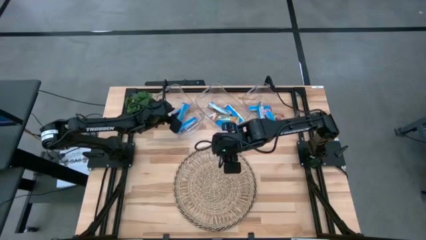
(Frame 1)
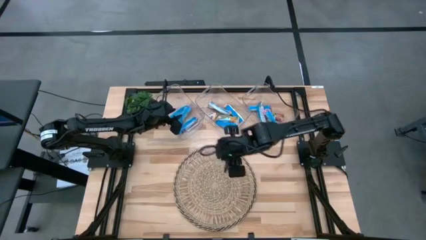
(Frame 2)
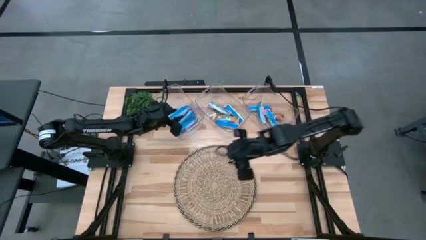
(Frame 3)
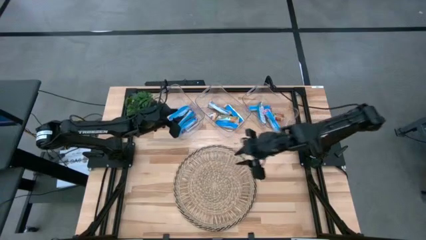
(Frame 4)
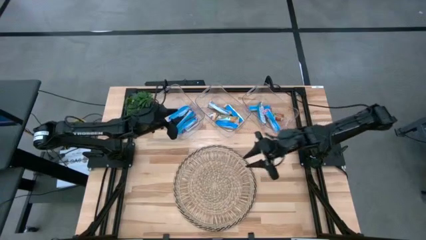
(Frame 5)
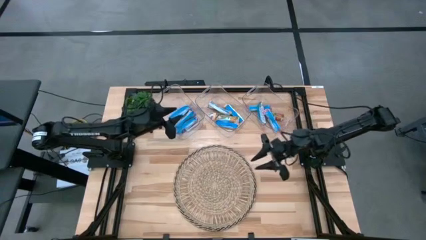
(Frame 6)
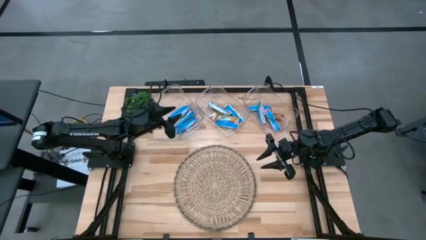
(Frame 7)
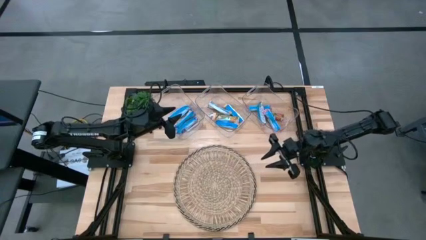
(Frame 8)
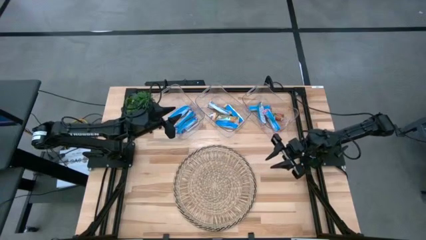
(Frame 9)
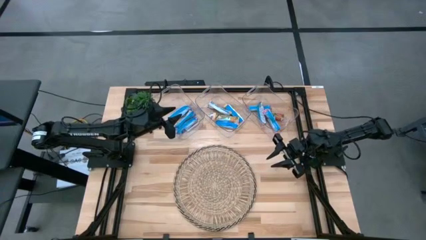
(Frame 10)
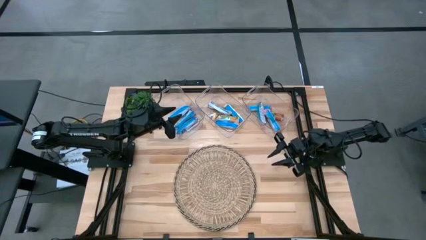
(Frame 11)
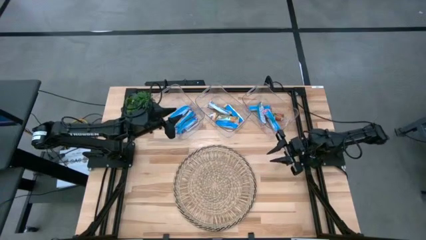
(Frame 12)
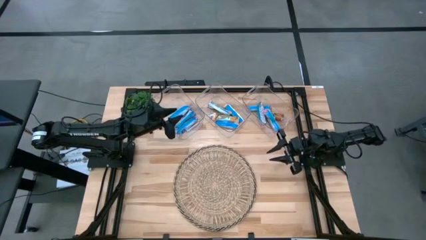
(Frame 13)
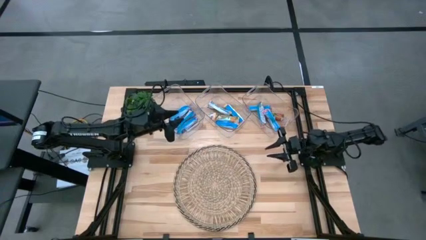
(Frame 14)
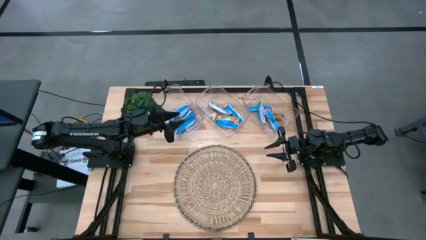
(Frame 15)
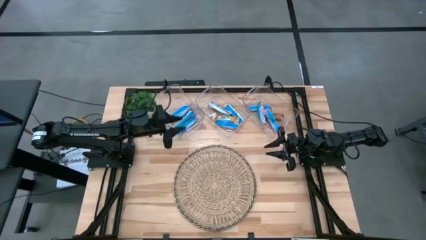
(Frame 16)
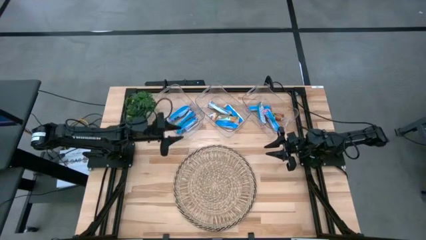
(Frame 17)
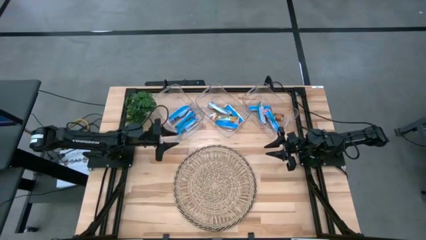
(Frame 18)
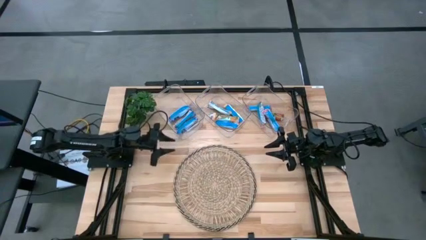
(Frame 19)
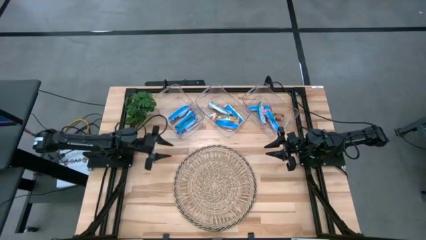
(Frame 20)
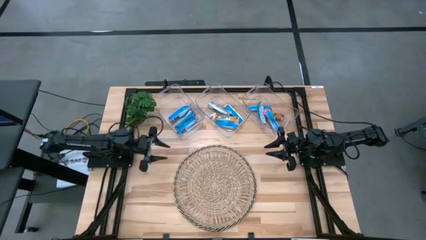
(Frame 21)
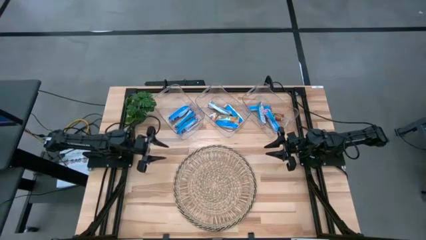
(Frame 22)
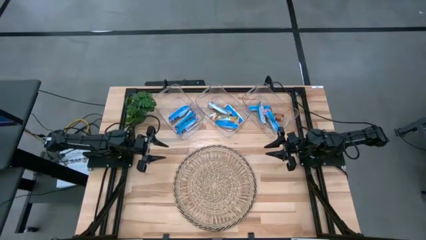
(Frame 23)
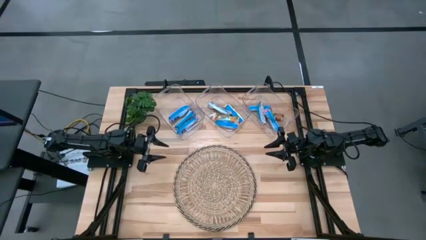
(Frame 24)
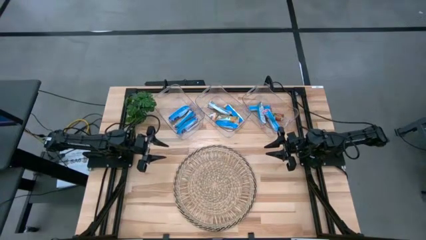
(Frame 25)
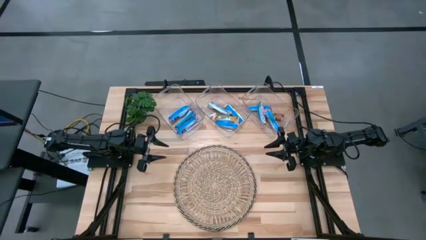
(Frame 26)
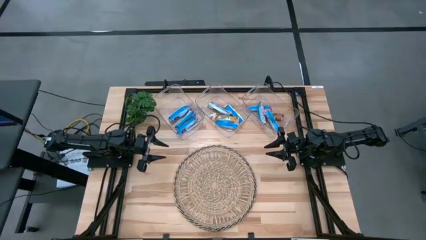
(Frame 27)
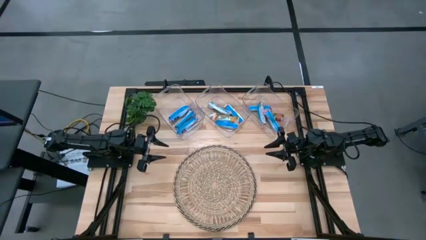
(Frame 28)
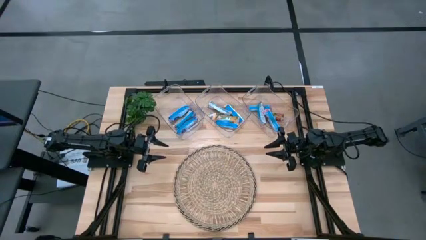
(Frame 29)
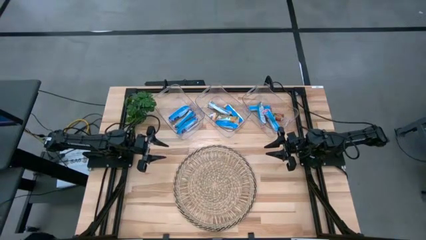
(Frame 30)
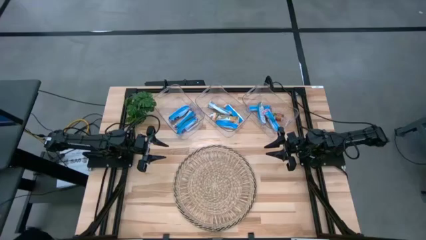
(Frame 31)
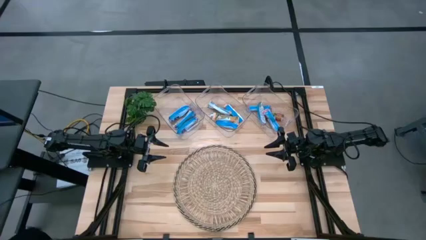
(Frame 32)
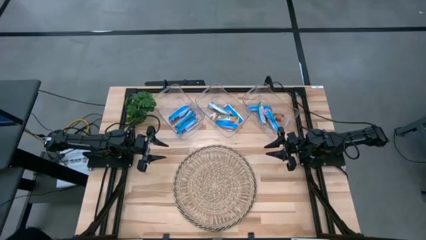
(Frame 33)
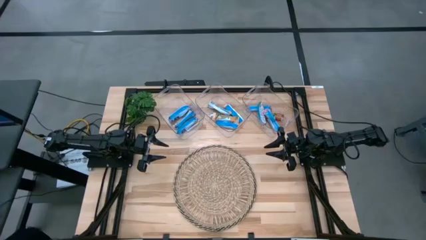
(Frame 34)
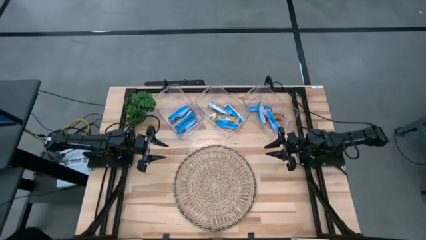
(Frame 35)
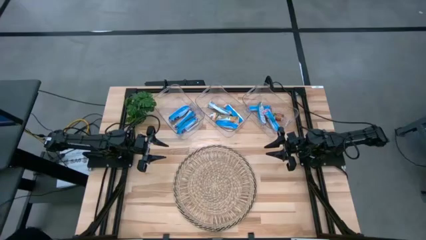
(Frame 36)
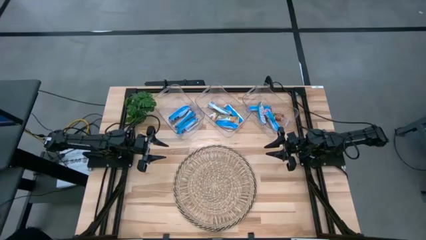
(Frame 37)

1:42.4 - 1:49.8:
Task: Pick and place Granola Bars by type
Return to Home Position

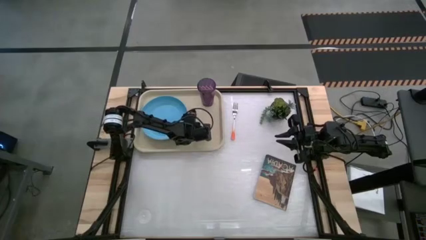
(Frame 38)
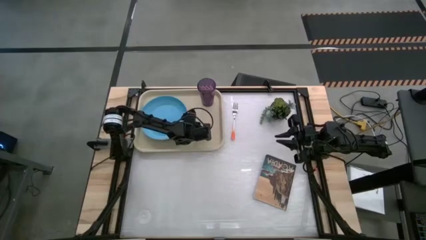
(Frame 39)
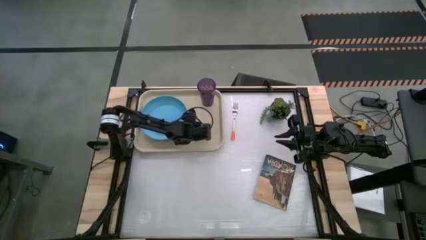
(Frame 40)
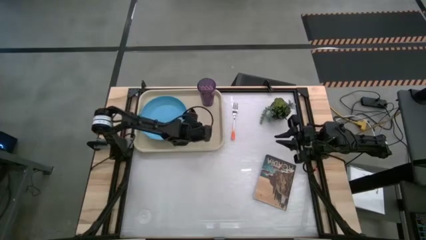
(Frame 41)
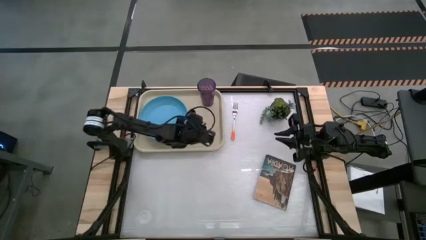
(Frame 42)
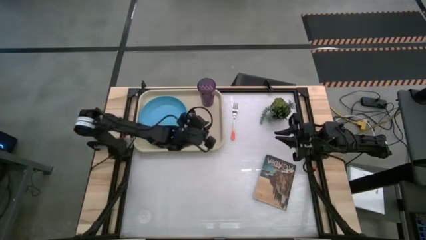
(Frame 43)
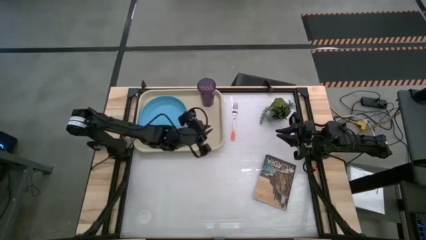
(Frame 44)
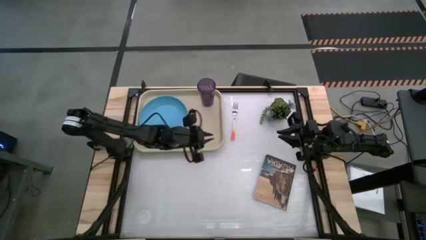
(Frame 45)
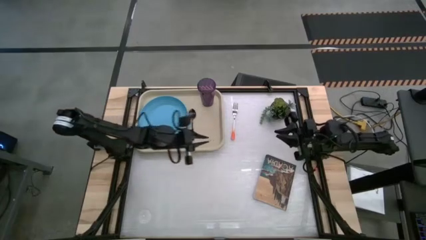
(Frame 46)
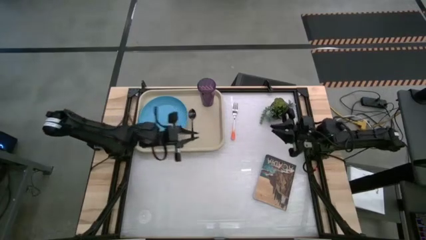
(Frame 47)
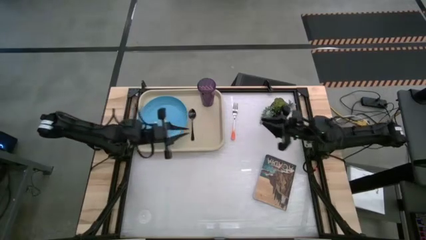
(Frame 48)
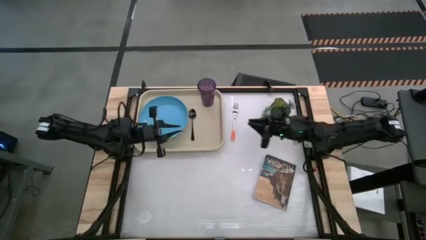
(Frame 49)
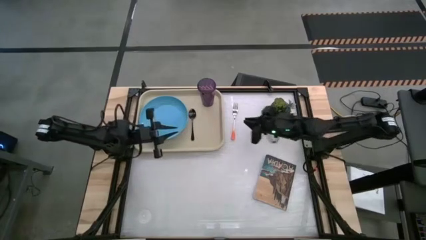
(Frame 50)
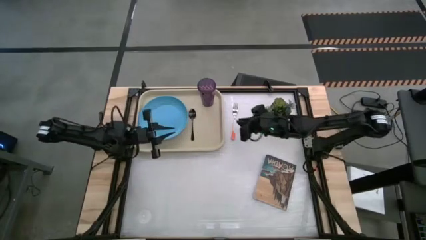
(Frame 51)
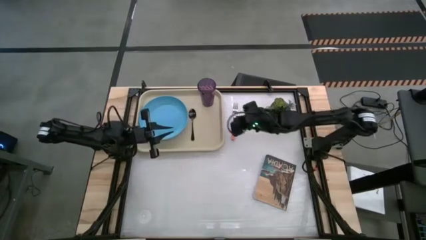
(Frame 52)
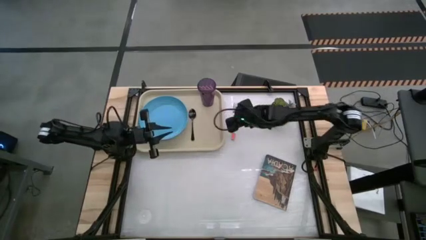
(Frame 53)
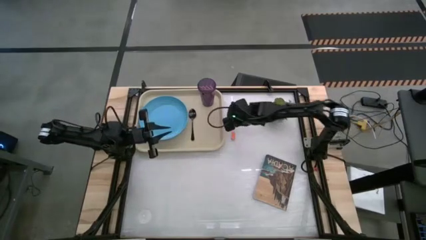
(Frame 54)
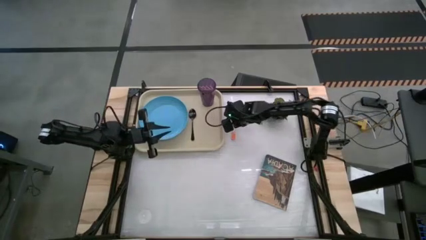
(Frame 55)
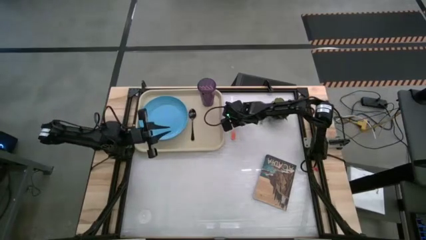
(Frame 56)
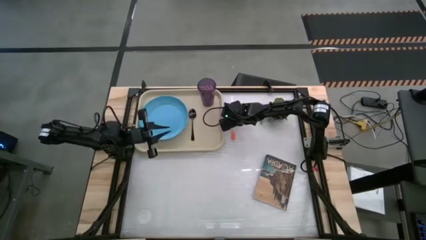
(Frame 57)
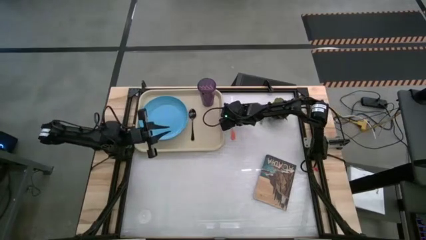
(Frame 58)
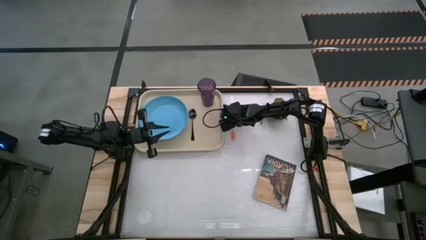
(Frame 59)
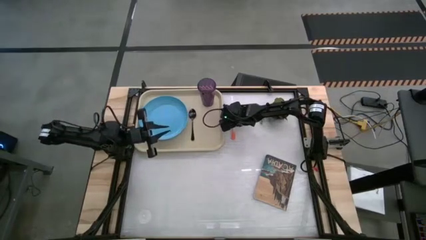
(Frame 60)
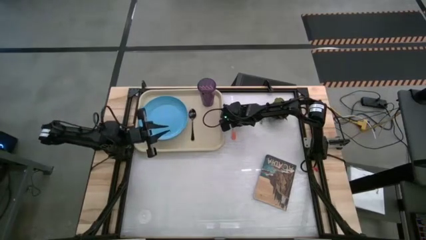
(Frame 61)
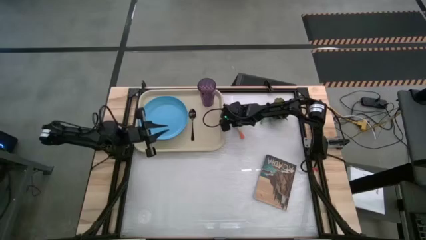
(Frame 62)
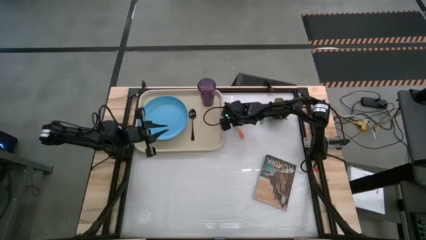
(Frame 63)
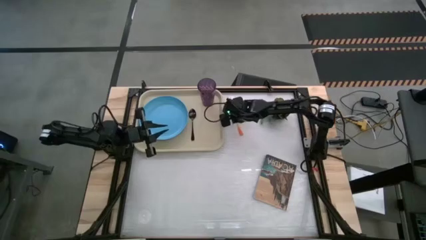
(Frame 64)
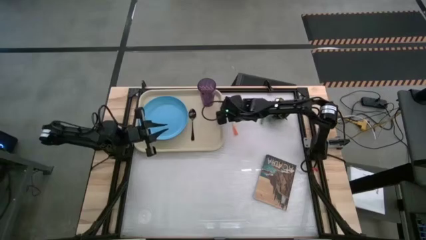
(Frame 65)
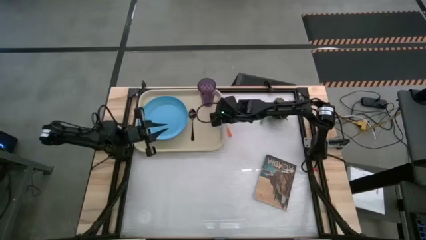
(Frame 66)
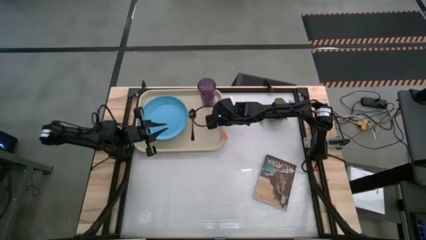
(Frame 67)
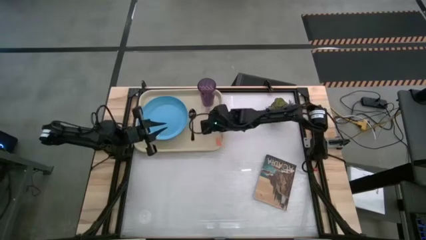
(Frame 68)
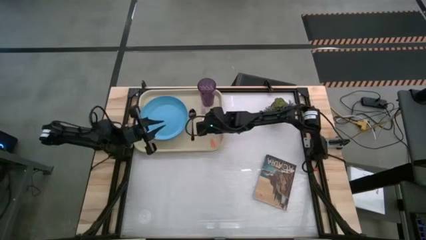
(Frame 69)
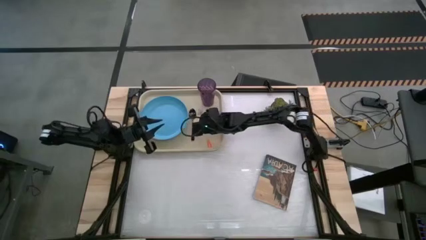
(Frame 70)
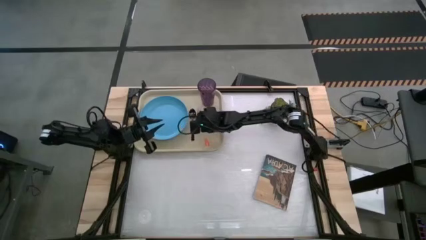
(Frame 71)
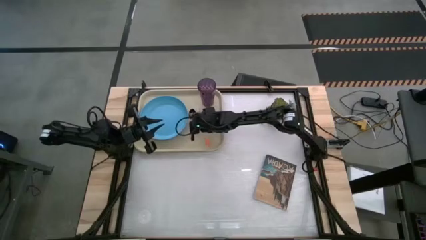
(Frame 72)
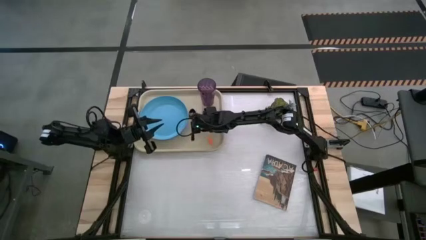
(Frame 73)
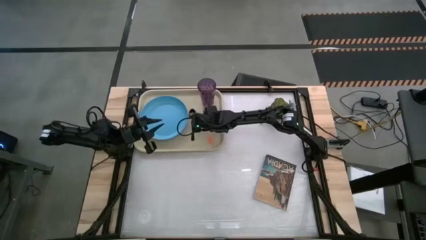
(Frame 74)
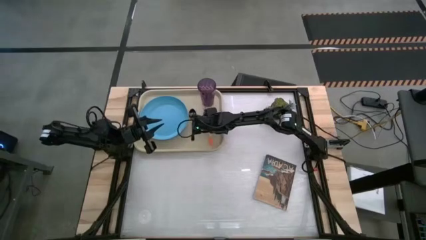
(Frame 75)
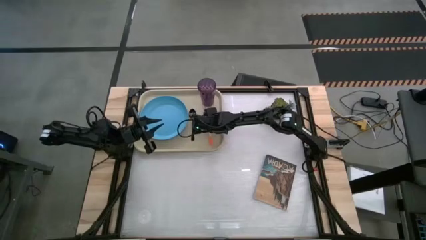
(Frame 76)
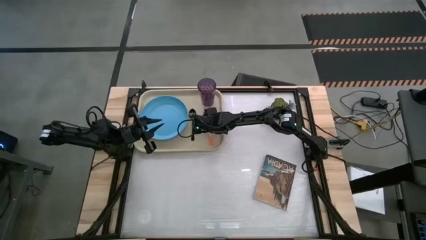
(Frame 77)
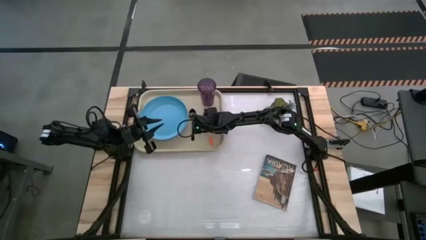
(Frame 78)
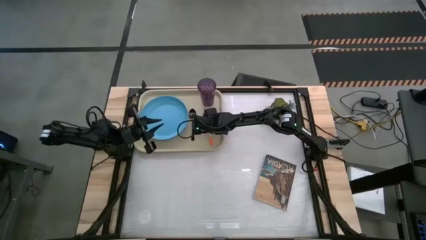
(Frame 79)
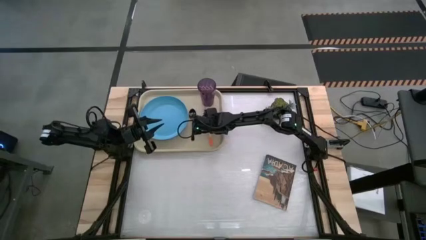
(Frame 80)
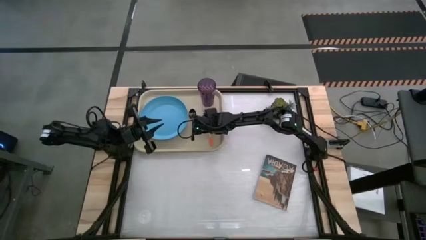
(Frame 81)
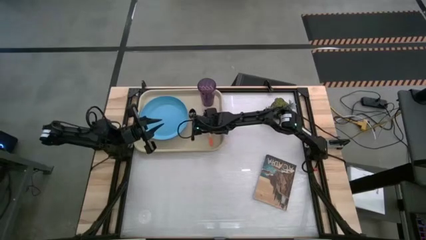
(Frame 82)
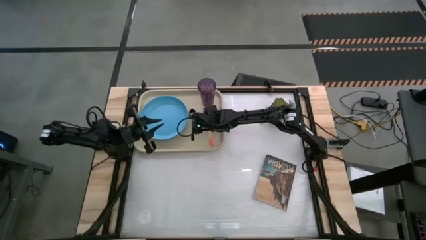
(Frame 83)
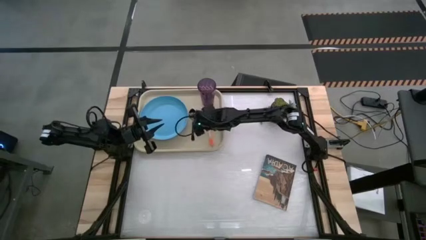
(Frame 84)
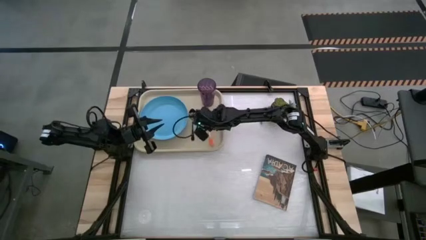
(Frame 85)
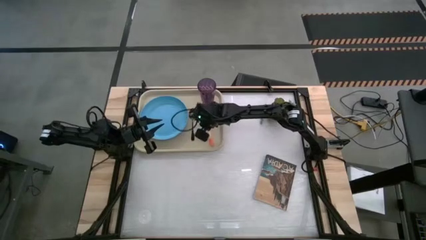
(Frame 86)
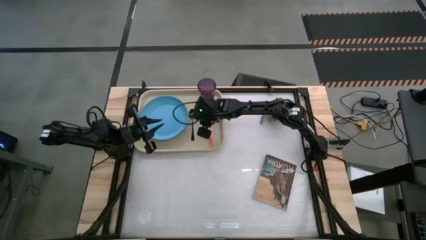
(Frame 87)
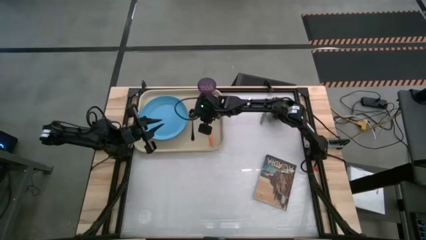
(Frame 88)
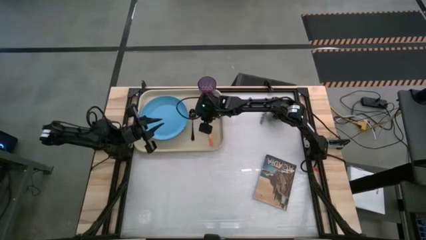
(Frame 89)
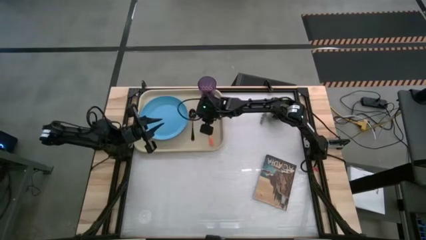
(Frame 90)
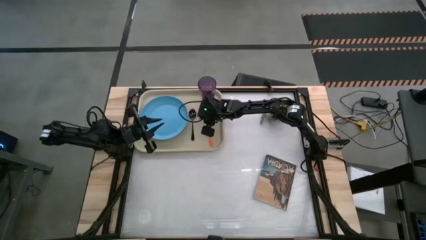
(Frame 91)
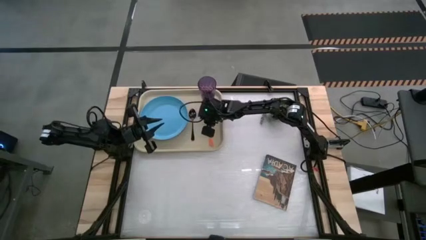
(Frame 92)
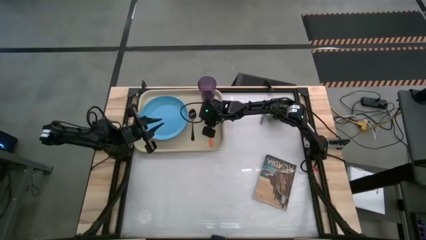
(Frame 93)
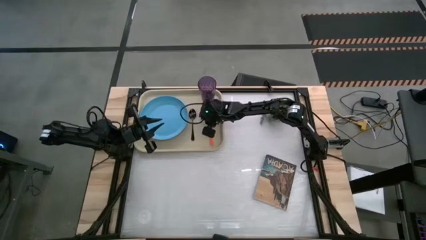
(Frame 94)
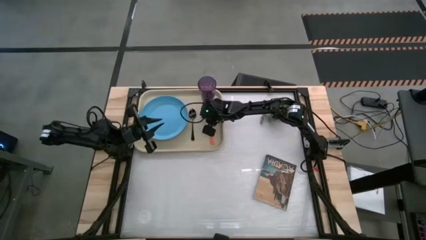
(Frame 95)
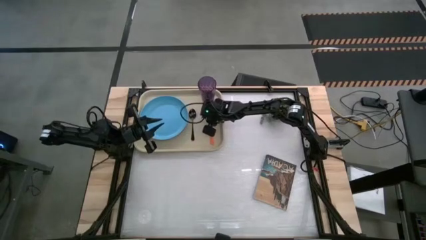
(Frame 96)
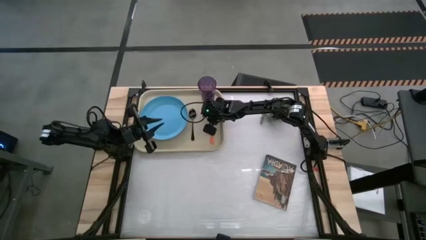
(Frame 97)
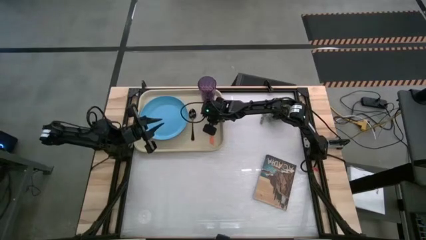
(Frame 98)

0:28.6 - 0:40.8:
Task: Pick and place plate/cup/fork/spoon on tray
Put the orange fork on the brown tray to the right side of the black spoon
